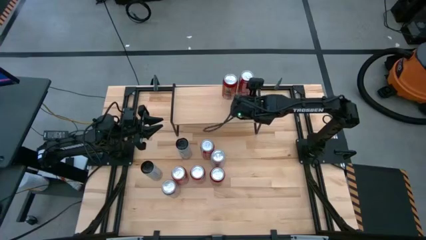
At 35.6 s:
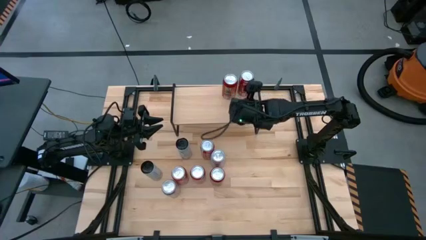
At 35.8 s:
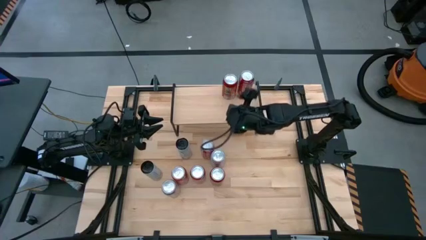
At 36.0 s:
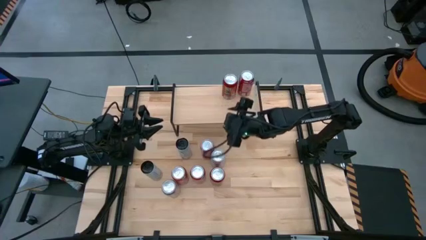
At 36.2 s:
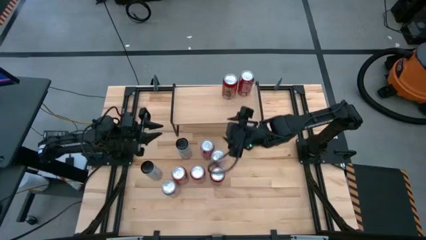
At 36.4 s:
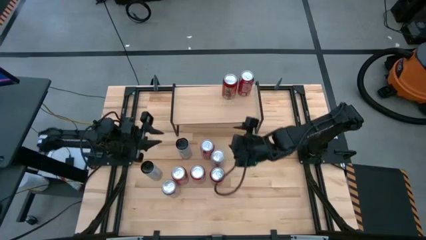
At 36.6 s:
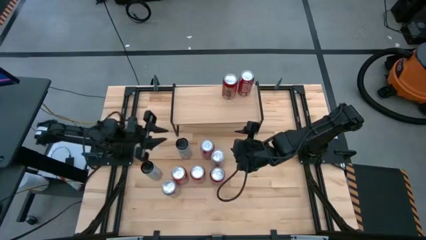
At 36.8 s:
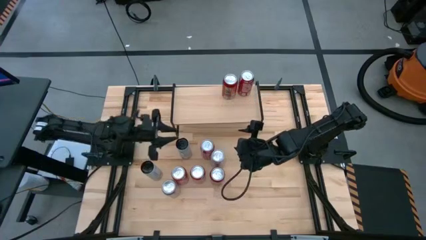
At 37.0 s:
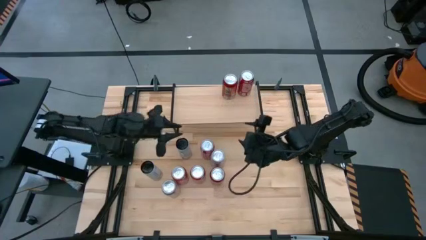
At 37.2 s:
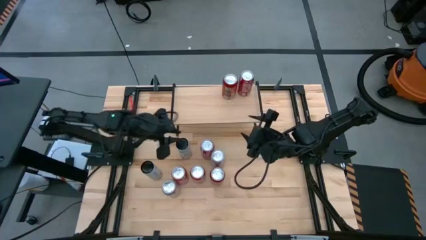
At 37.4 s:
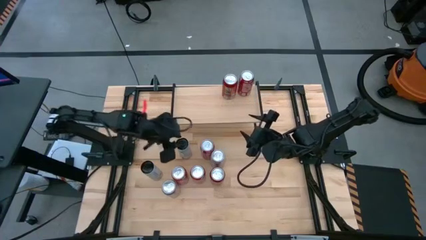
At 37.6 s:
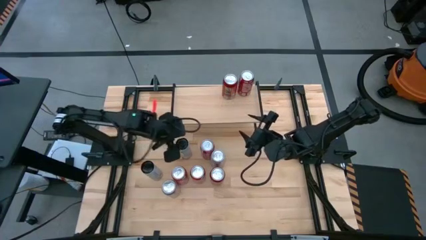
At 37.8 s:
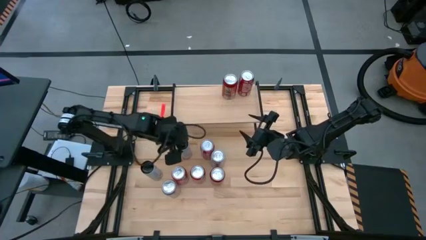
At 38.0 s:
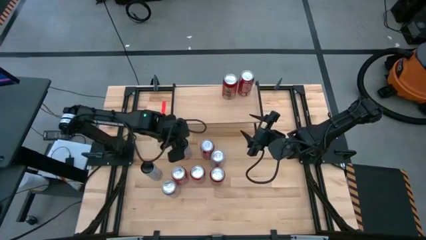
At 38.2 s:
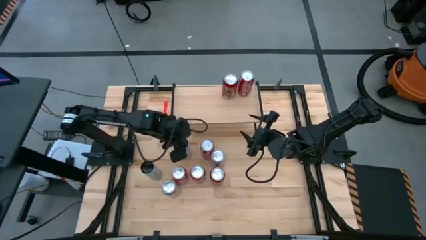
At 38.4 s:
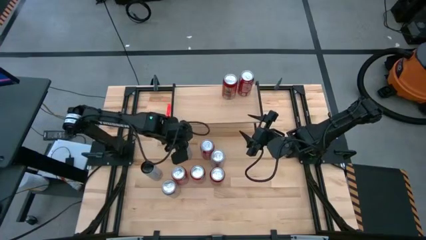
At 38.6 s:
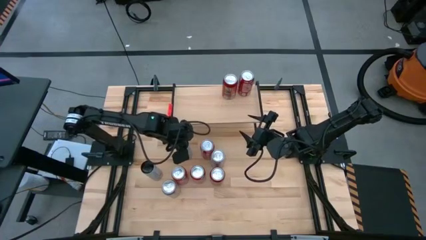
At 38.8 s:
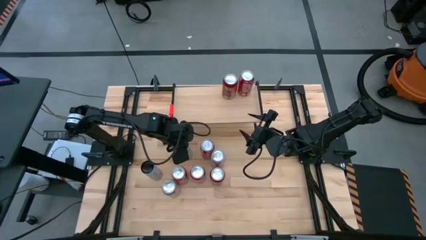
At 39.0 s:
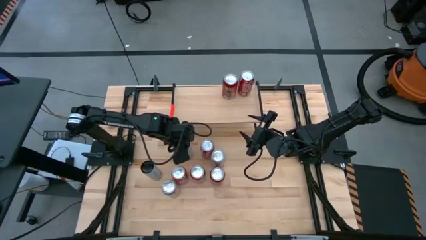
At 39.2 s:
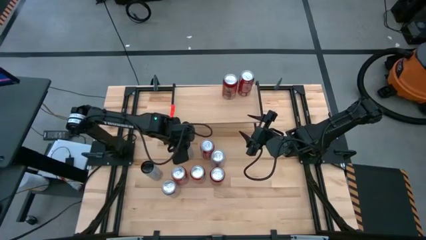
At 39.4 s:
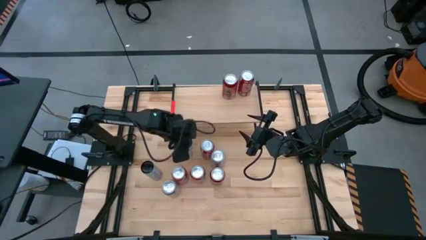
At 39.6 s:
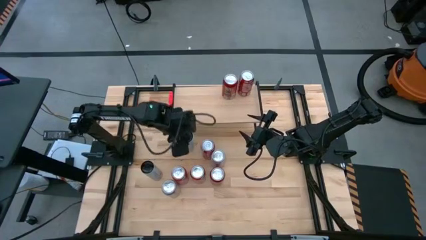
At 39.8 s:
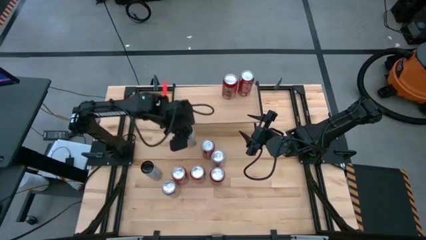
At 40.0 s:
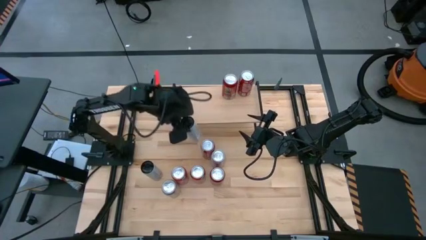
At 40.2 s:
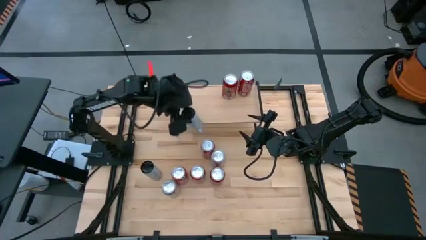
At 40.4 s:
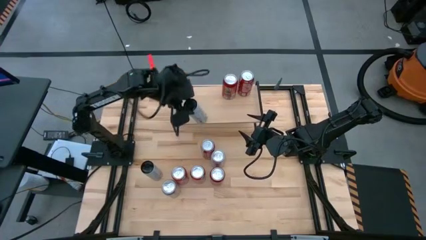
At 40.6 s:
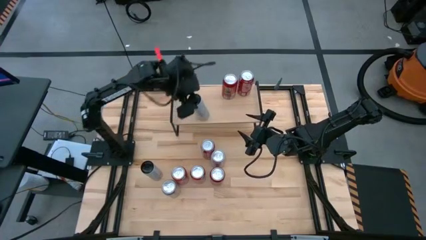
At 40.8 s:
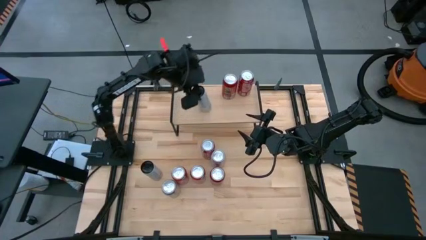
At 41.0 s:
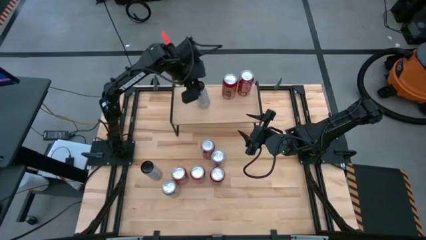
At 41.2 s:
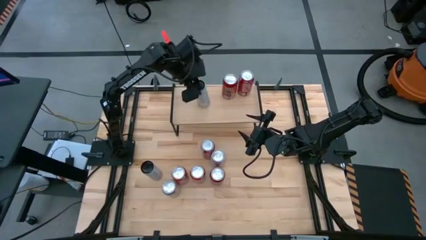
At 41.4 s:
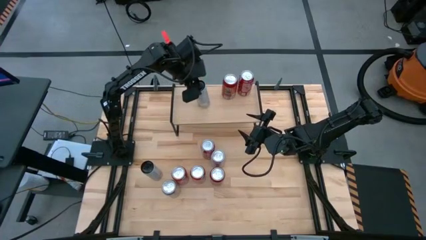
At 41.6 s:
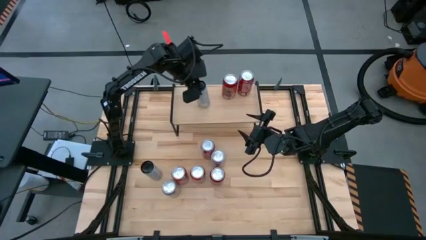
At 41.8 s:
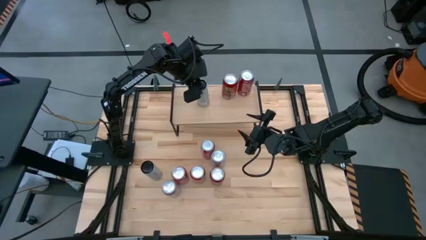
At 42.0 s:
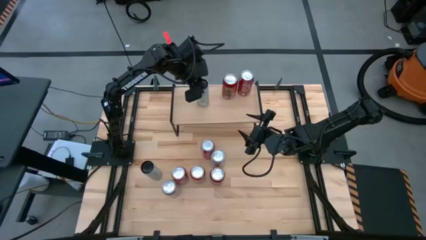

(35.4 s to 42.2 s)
Task: Place canned beverage on shelf
Put the black soda can on the shelf

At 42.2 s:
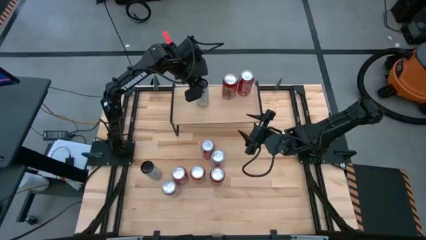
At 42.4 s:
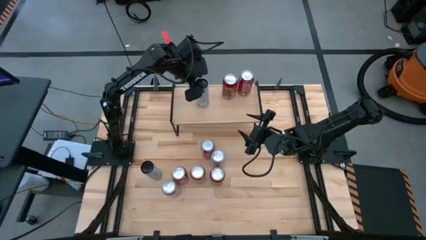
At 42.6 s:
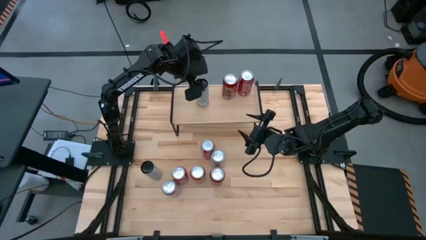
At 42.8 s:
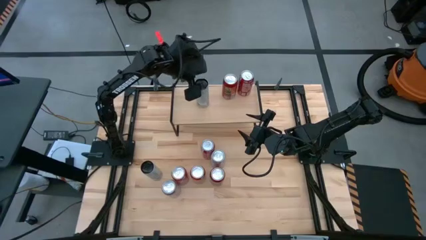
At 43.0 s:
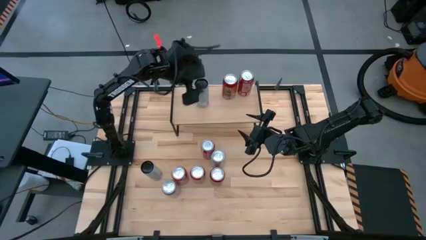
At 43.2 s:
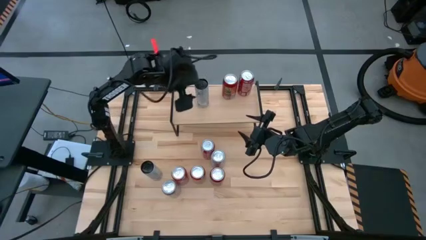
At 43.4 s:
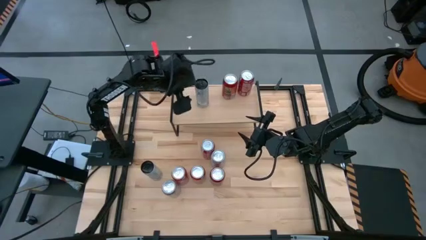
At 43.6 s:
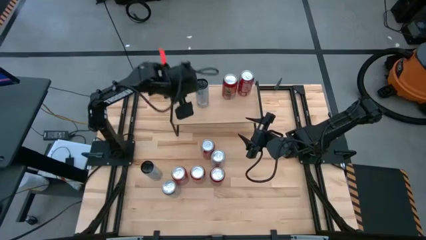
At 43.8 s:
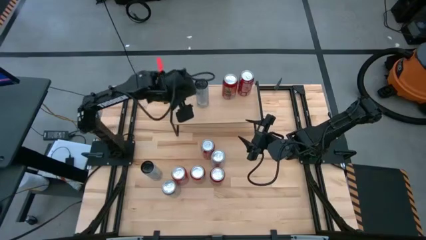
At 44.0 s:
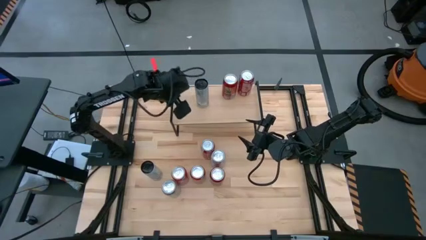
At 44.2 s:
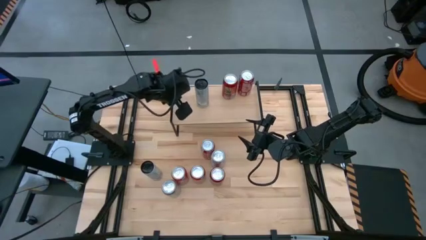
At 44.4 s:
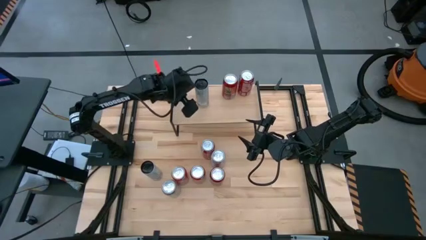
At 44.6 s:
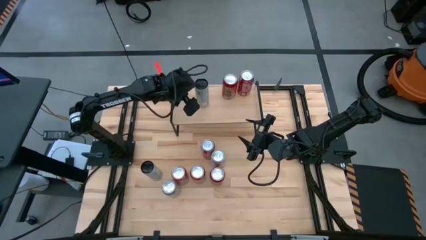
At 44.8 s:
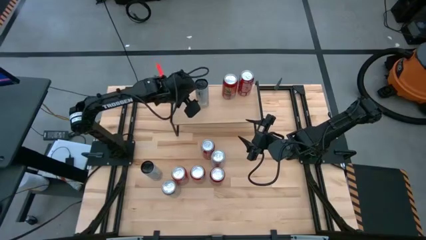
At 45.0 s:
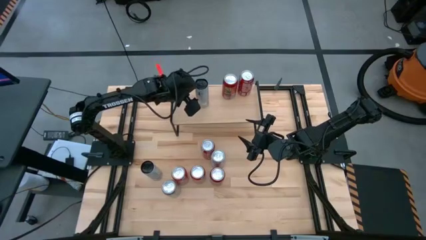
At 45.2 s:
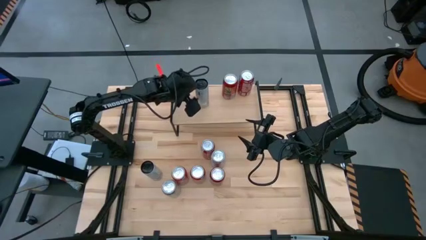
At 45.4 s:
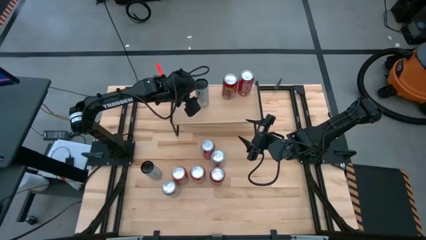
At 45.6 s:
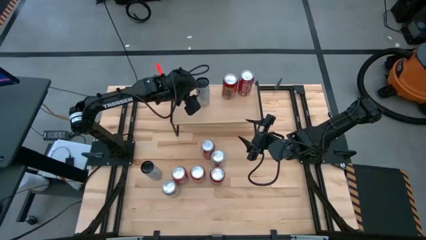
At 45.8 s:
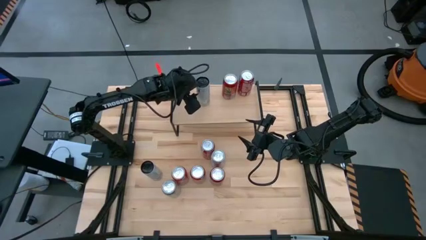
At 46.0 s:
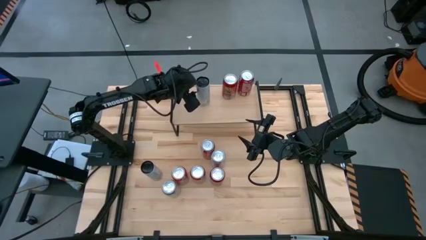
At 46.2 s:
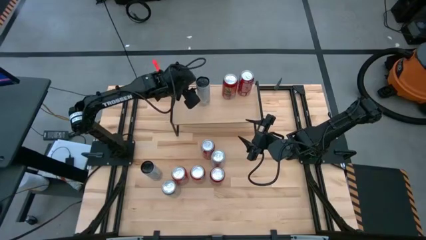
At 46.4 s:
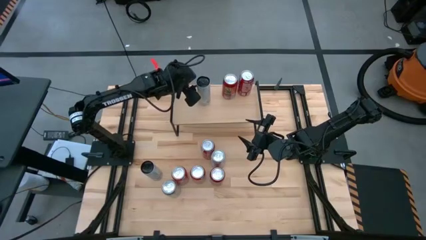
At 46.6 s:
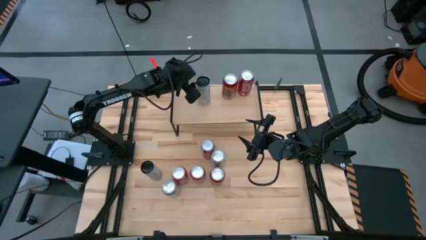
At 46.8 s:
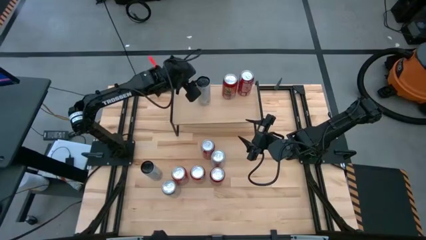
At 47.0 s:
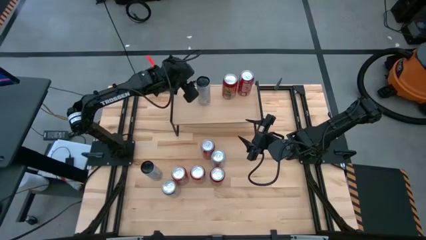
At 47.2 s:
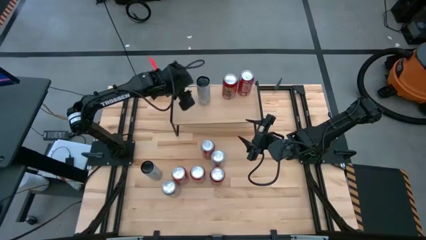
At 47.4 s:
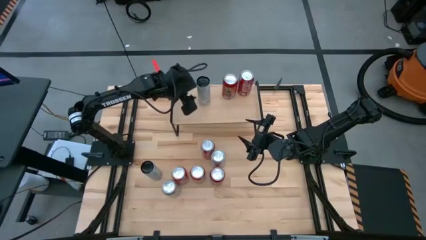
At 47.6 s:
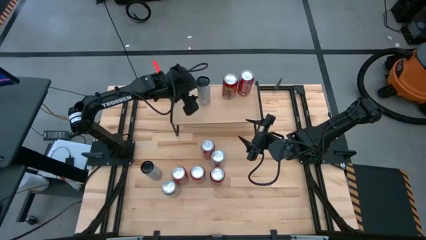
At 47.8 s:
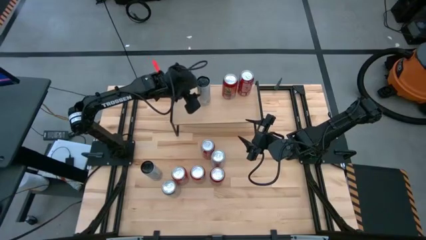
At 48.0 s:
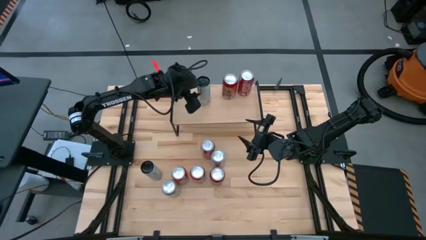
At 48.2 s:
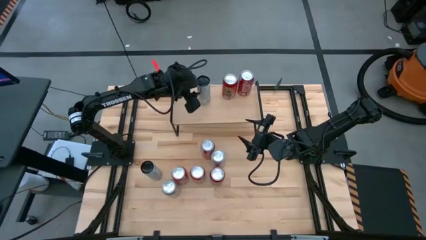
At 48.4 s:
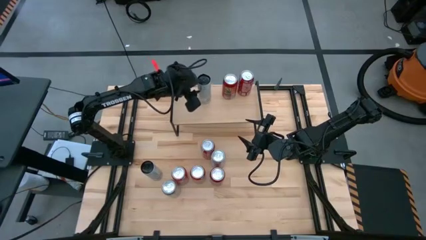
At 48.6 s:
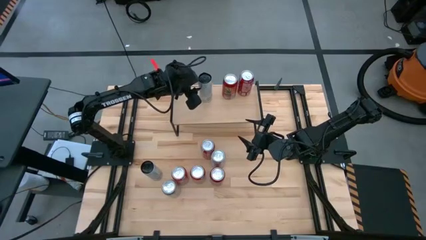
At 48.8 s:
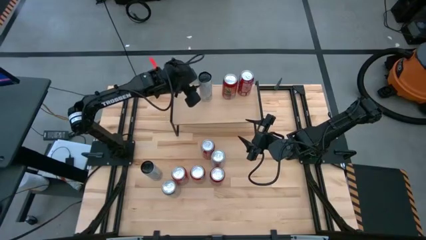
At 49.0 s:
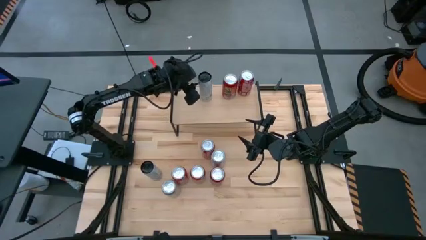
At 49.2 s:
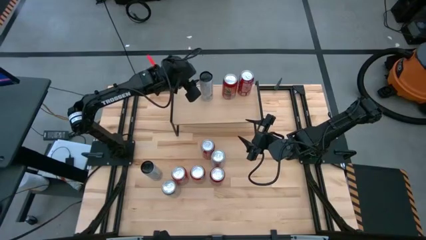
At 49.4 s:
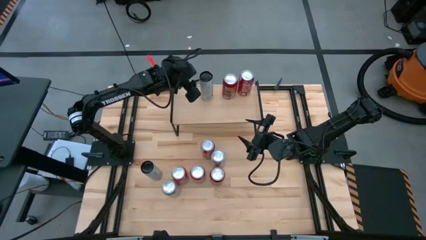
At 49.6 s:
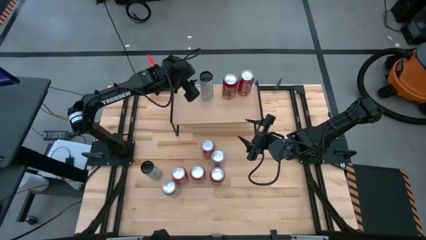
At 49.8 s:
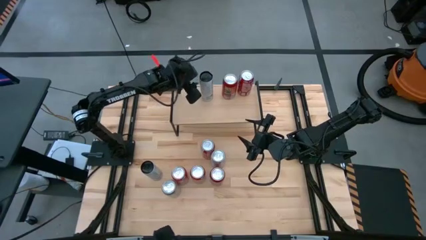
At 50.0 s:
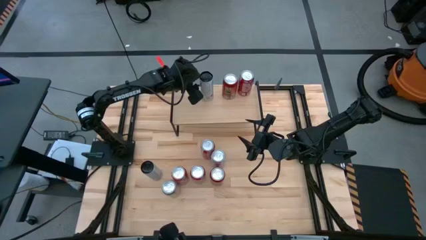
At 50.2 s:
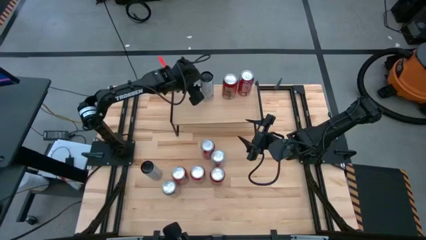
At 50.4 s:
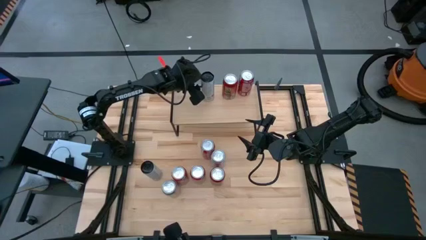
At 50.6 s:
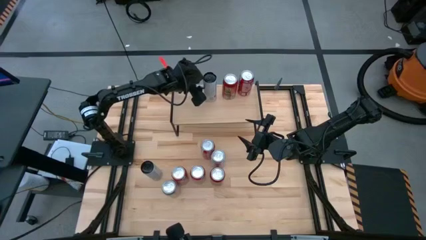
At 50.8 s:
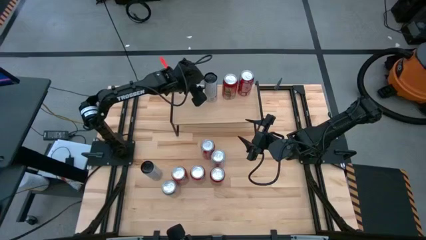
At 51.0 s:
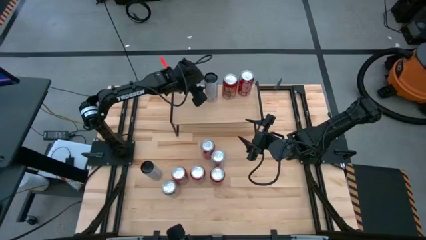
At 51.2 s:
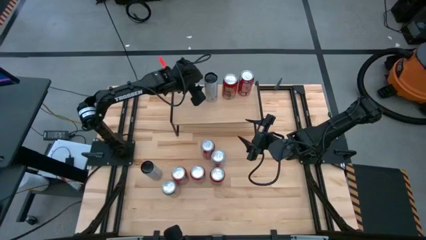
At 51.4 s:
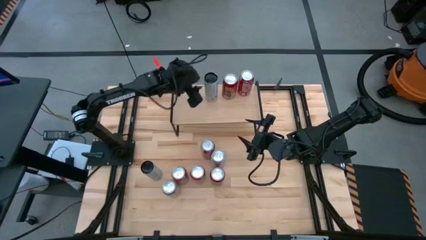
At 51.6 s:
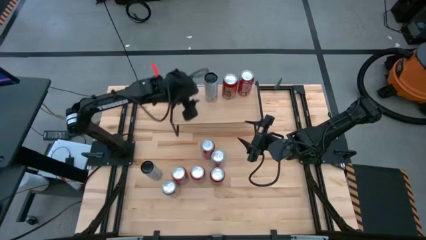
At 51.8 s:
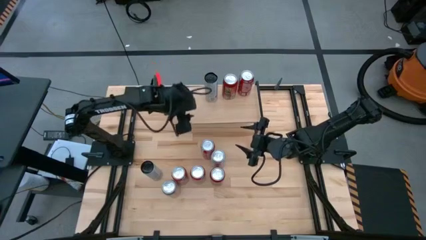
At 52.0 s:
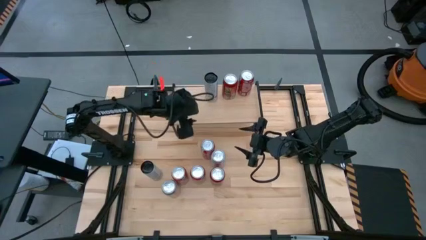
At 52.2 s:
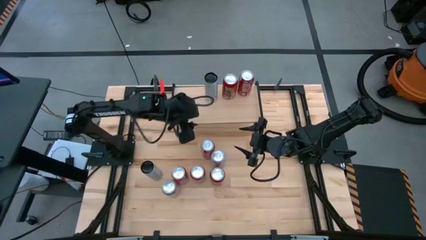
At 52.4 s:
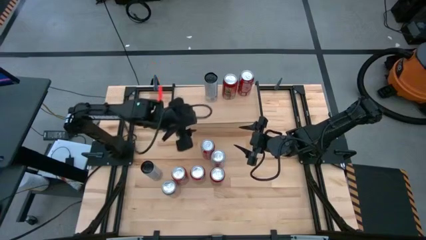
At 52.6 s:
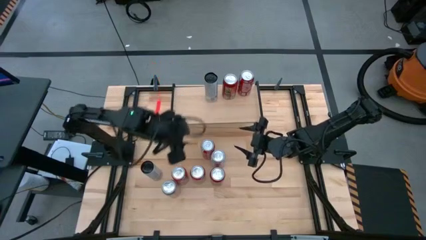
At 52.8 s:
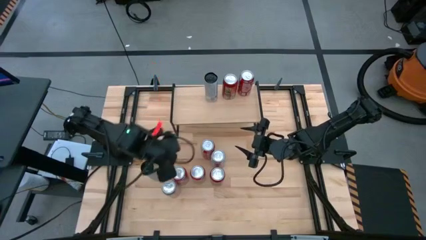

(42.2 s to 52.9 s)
Put the black soda can on the shelf aligned with the other black soda can
